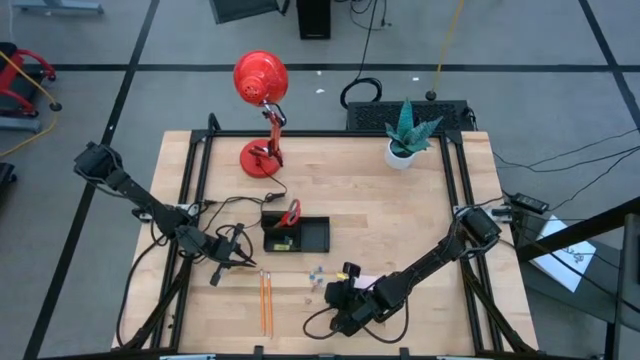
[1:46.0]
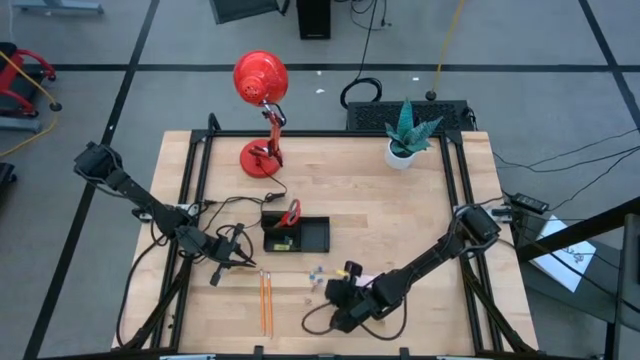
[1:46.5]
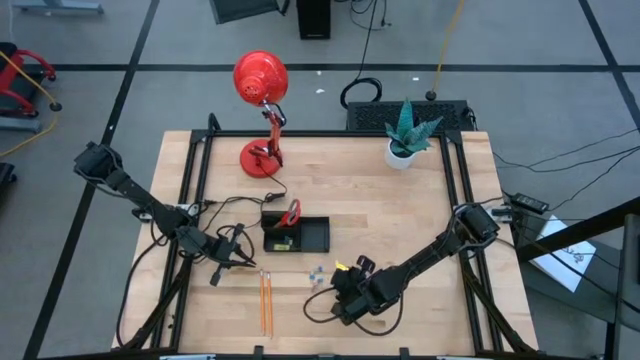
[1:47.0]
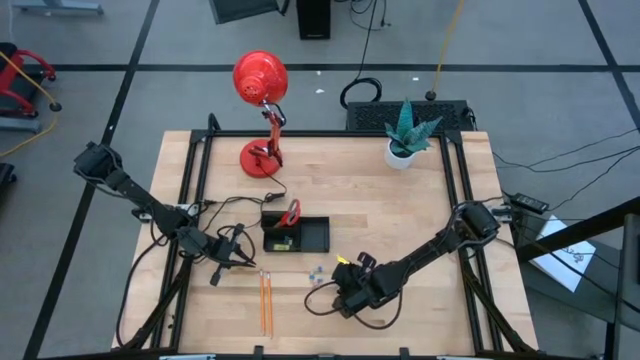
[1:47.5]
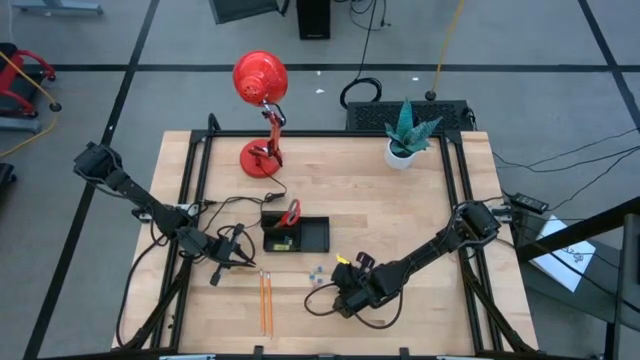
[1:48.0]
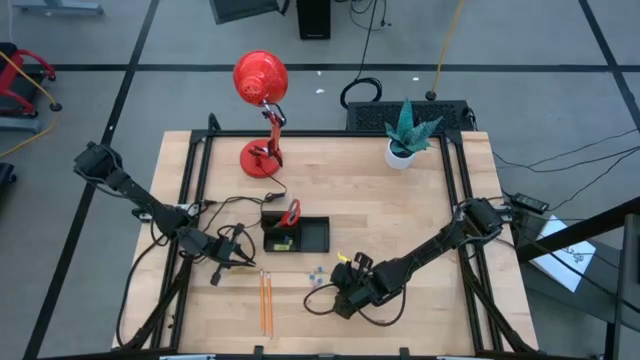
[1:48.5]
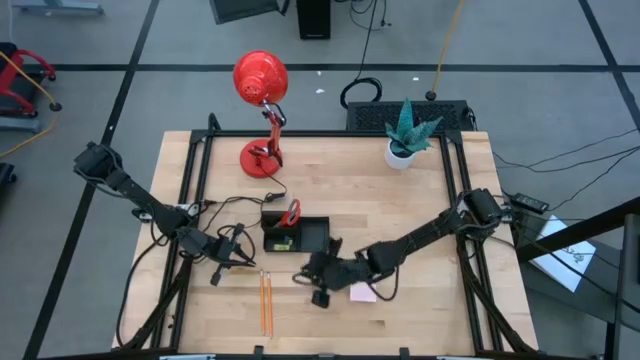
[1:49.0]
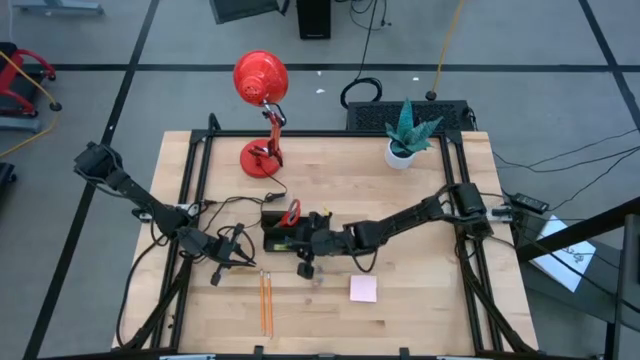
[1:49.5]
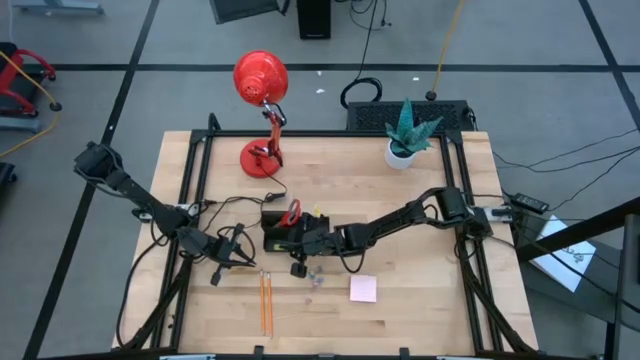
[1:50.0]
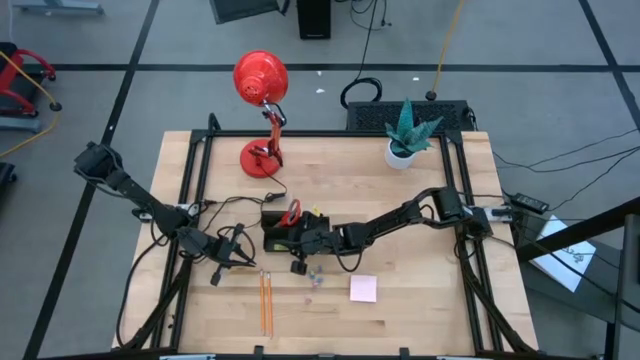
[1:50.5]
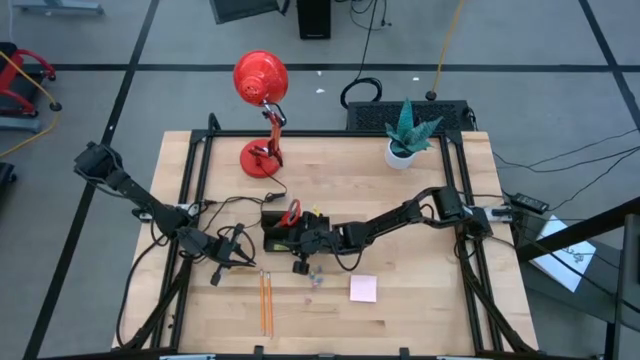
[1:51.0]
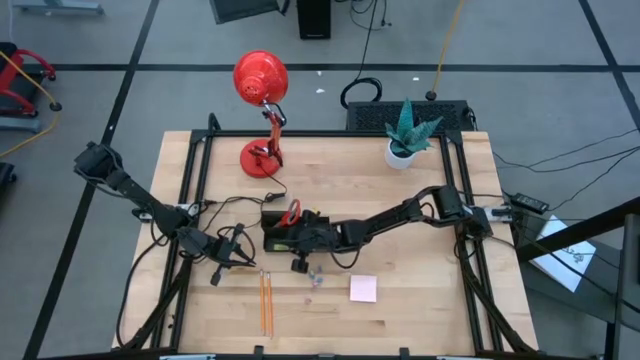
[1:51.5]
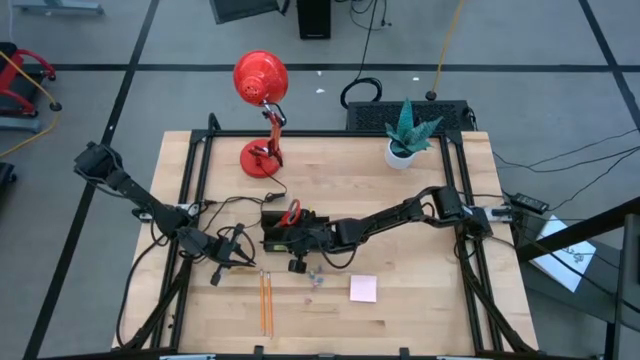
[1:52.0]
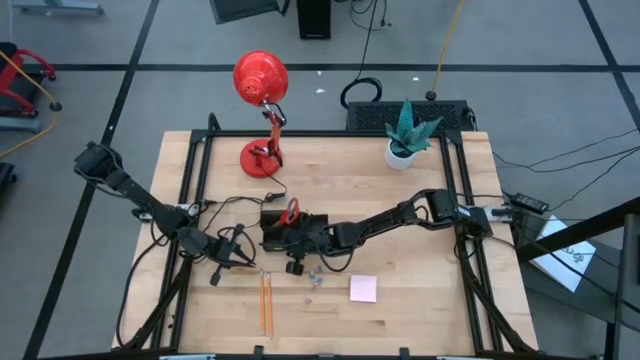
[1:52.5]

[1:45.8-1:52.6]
Task: Pick and place office supplies into organizer
Put the blue binder clip into the desk organizer

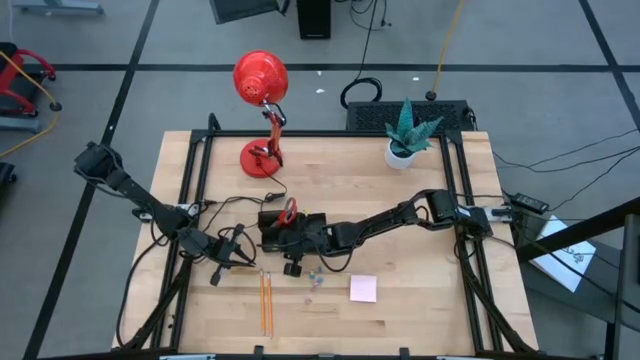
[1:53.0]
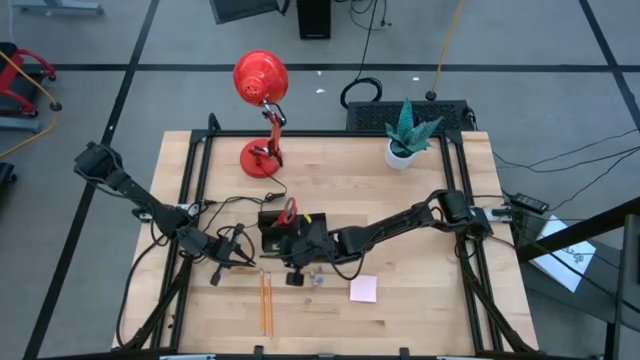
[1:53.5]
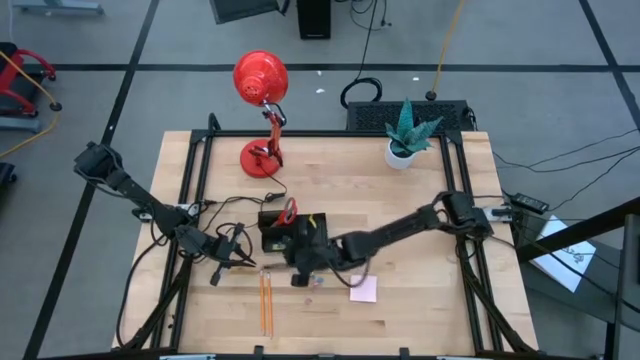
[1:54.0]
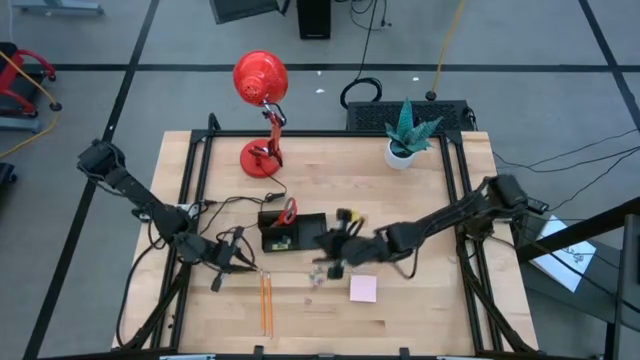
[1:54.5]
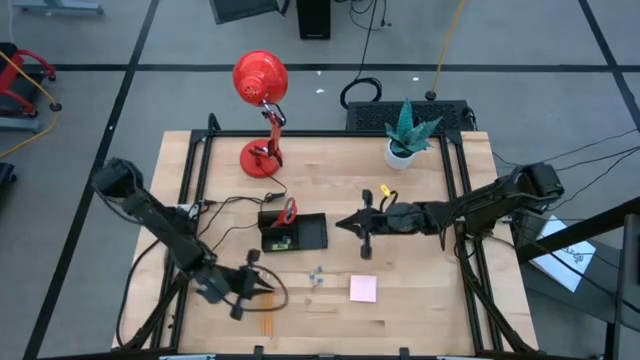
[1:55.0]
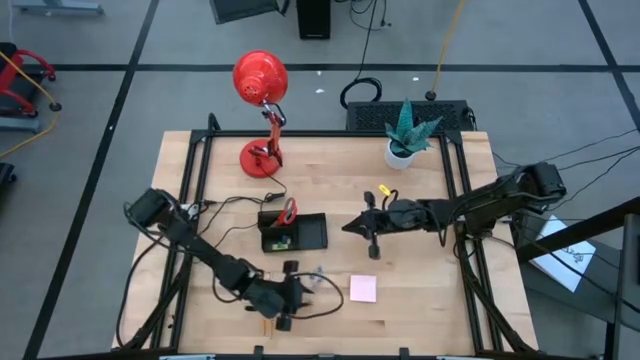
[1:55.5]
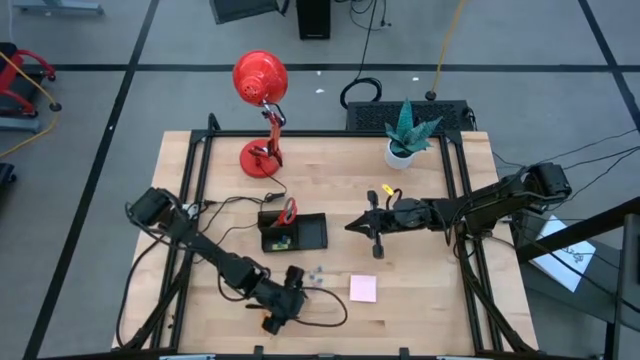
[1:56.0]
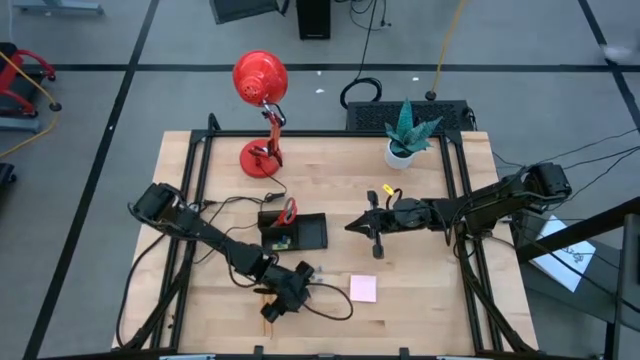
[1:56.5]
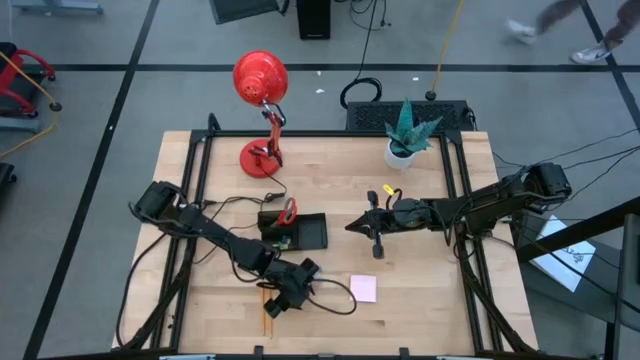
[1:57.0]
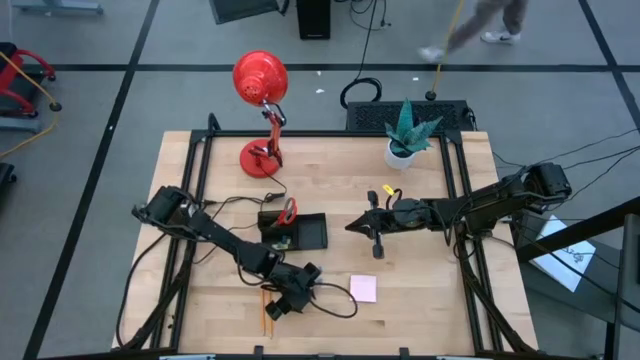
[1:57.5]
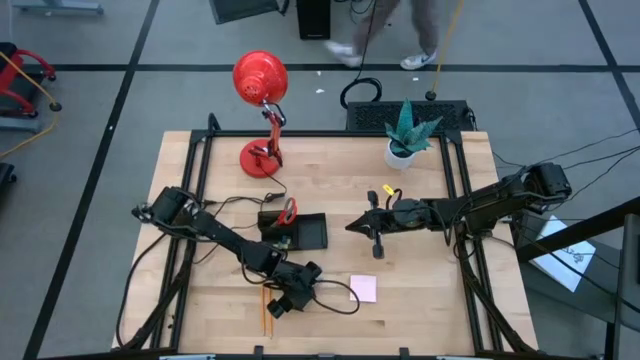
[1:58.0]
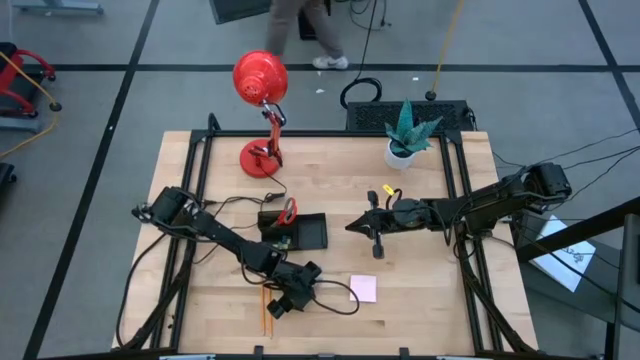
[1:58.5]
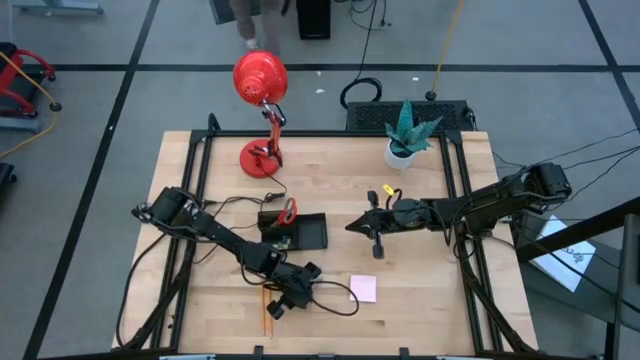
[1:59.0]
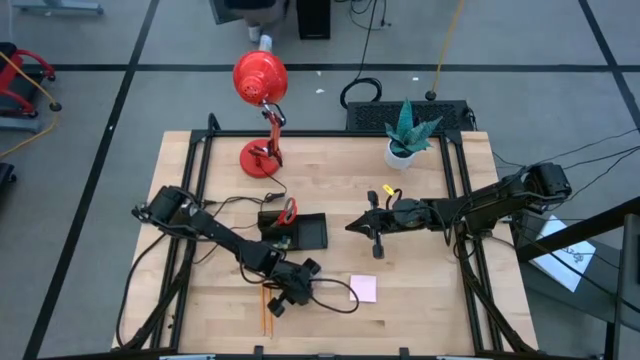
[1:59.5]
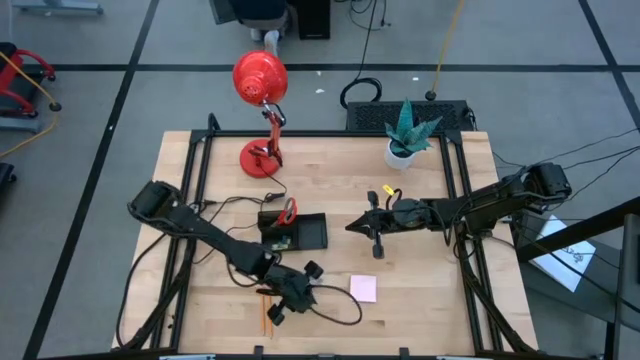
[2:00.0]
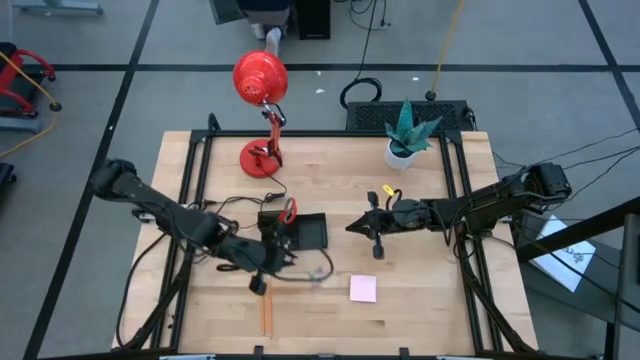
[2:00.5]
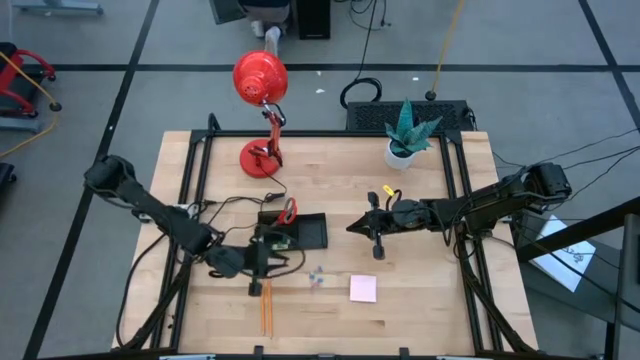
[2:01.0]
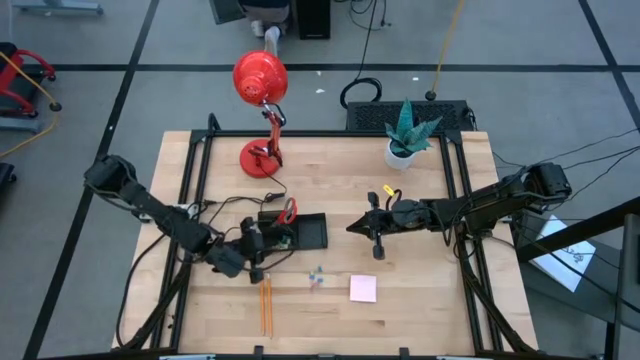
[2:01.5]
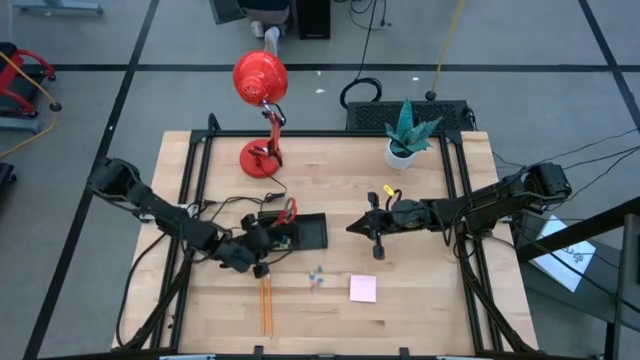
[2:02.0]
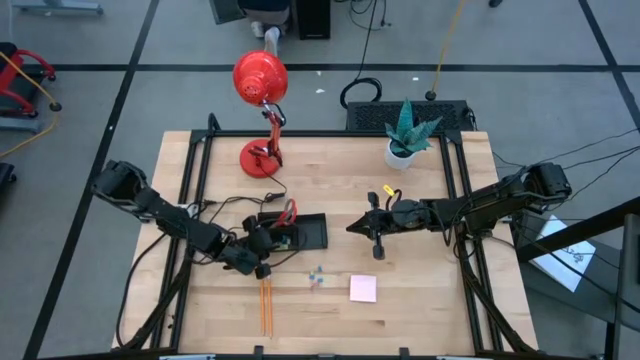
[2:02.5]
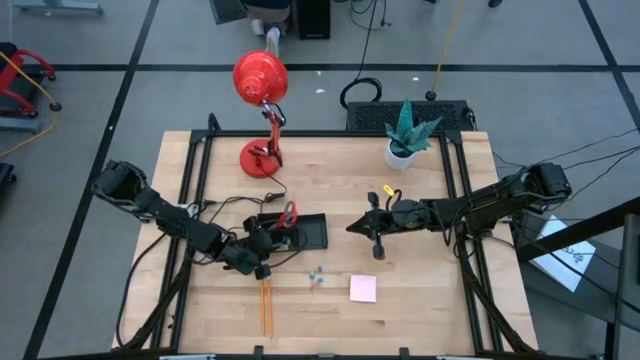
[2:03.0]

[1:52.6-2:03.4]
Put the pink binder clip into the desk organizer

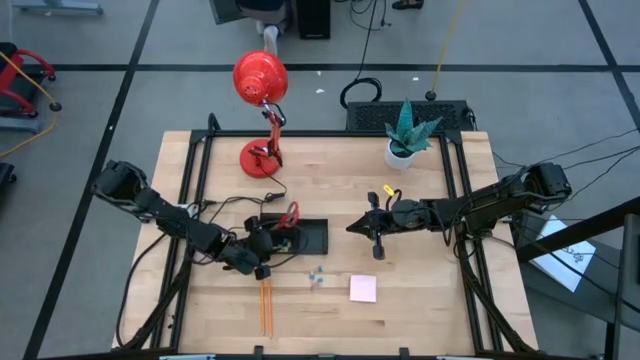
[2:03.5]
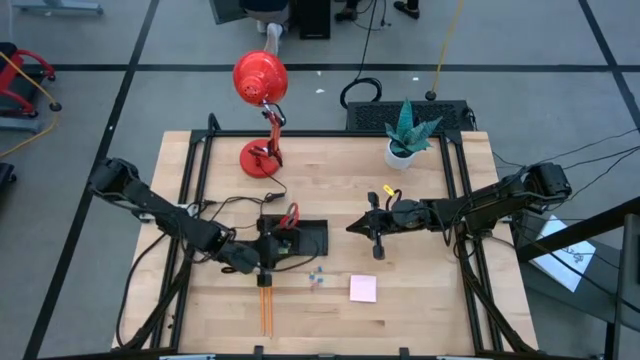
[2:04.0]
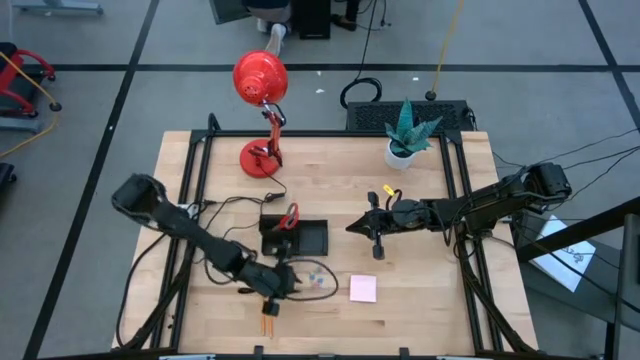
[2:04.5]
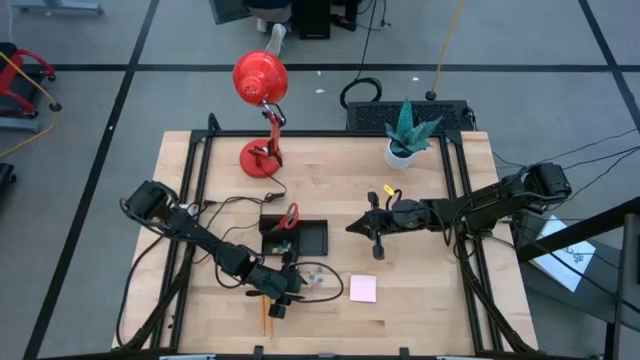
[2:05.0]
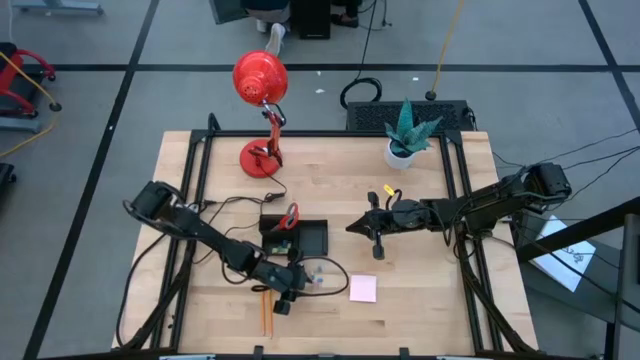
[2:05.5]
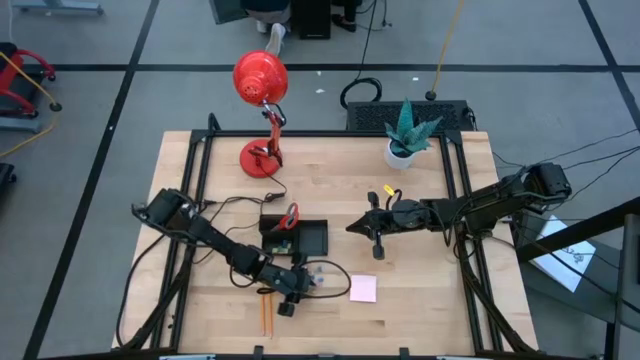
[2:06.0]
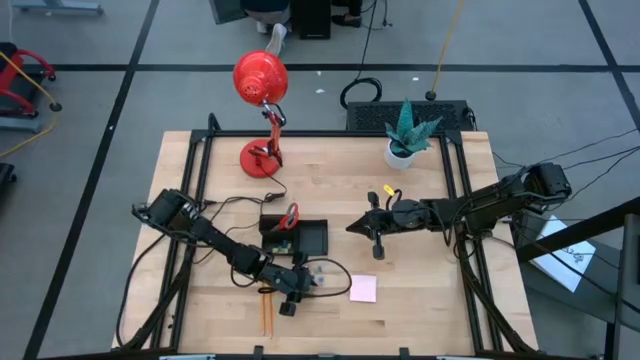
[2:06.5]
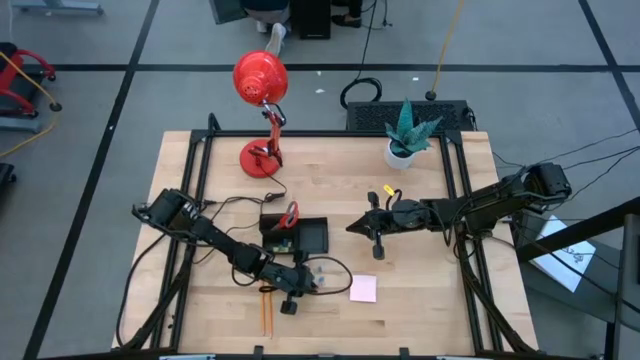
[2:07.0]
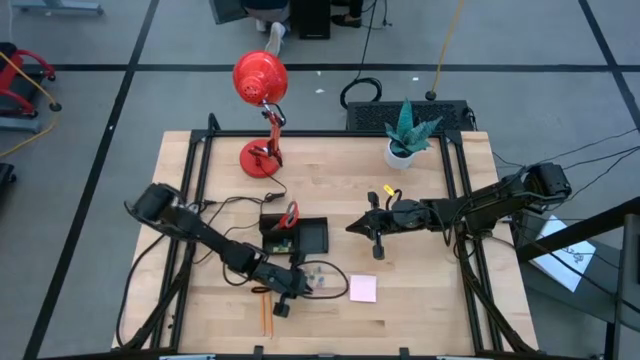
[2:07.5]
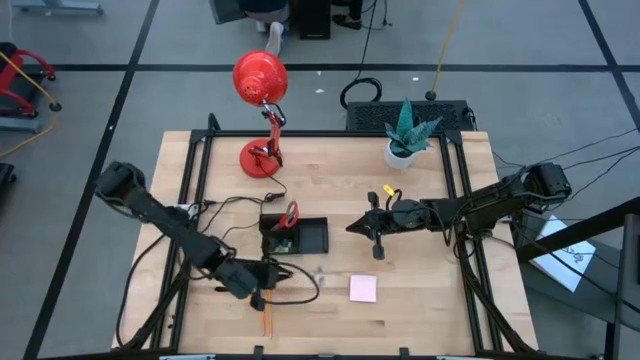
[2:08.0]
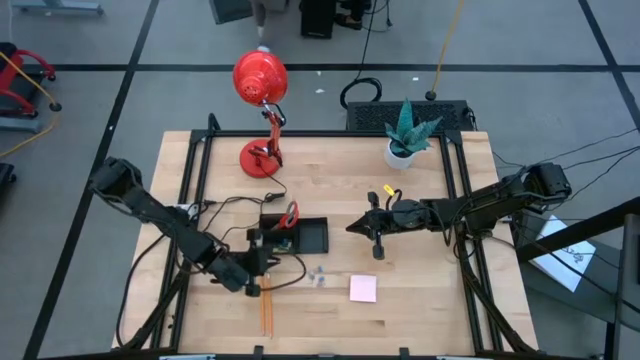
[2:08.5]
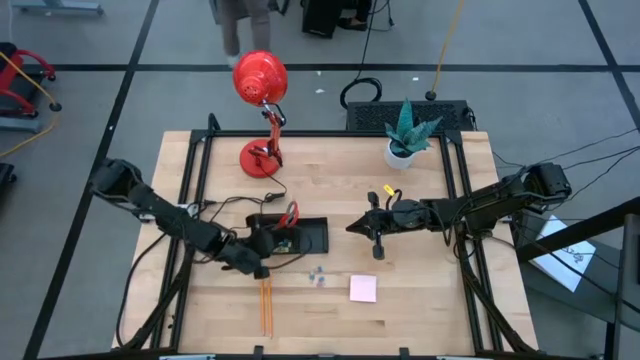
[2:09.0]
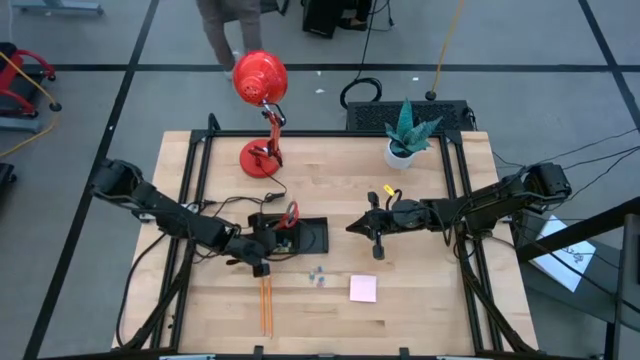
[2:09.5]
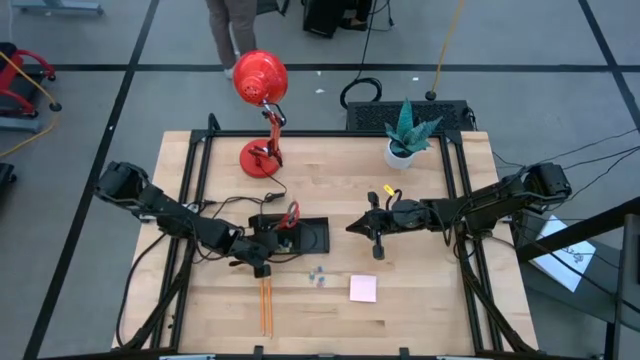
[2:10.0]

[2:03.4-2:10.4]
Put the pink binder clip into the desk organizer
